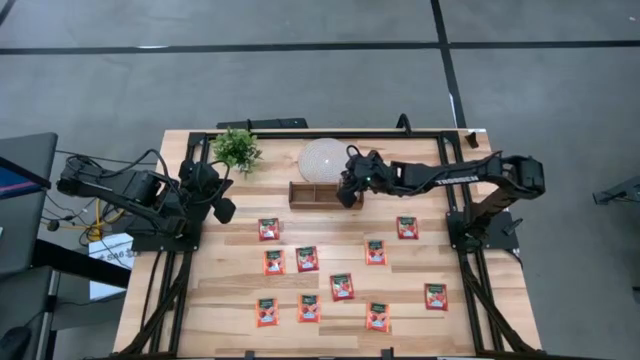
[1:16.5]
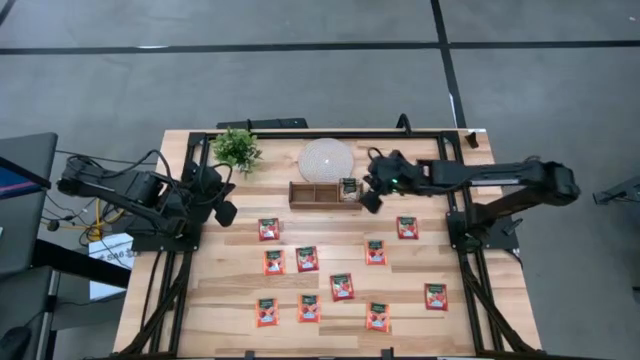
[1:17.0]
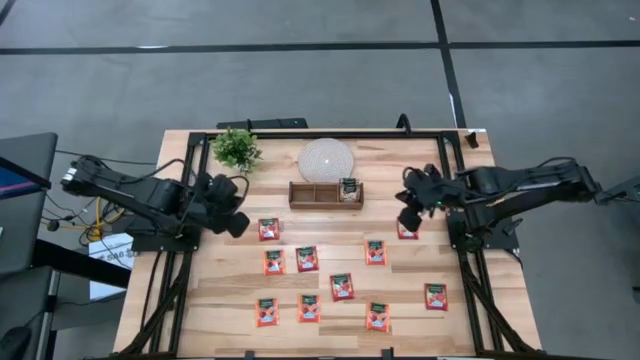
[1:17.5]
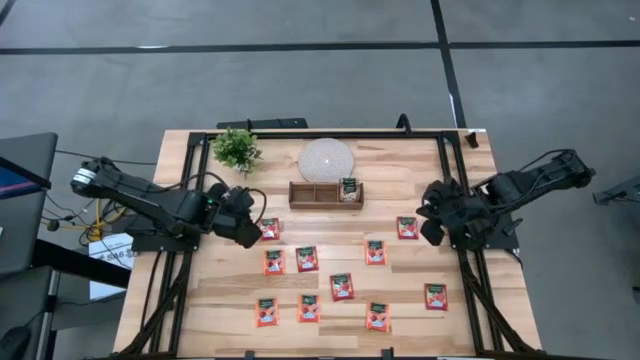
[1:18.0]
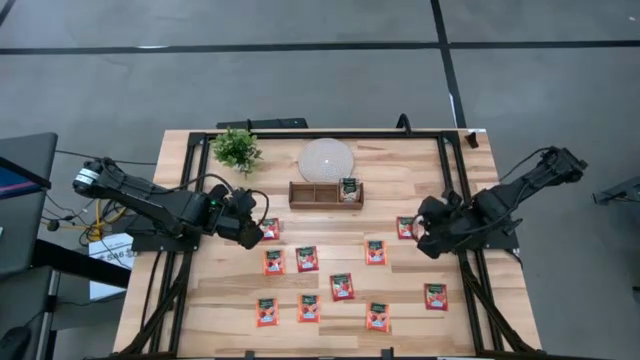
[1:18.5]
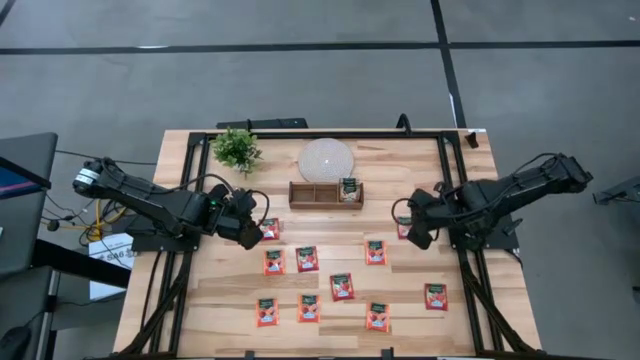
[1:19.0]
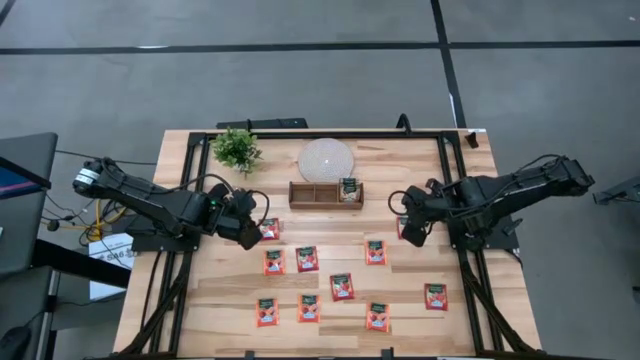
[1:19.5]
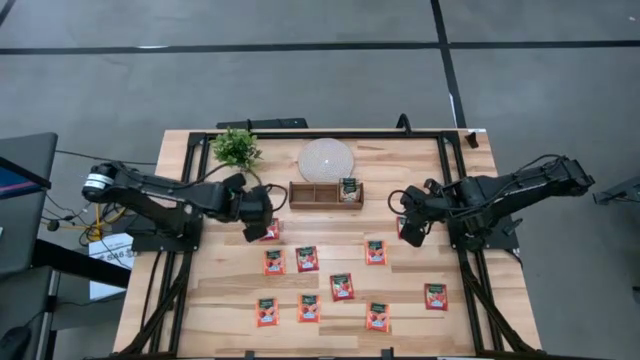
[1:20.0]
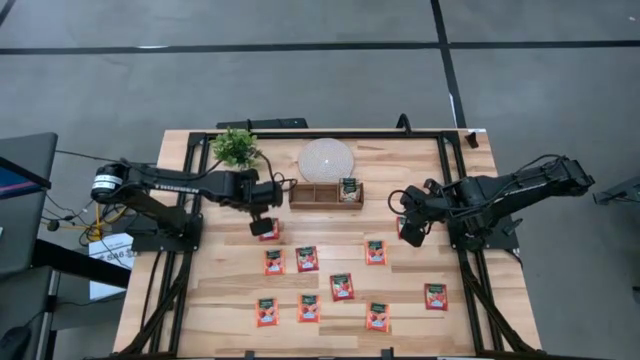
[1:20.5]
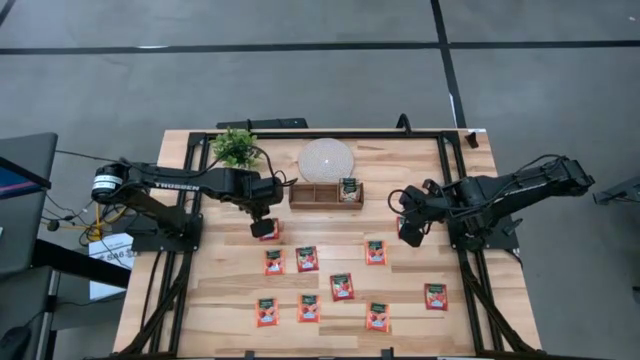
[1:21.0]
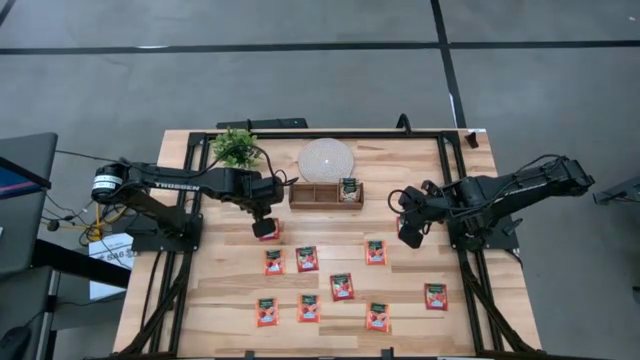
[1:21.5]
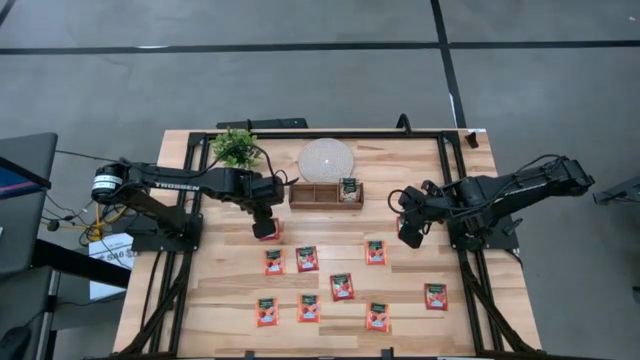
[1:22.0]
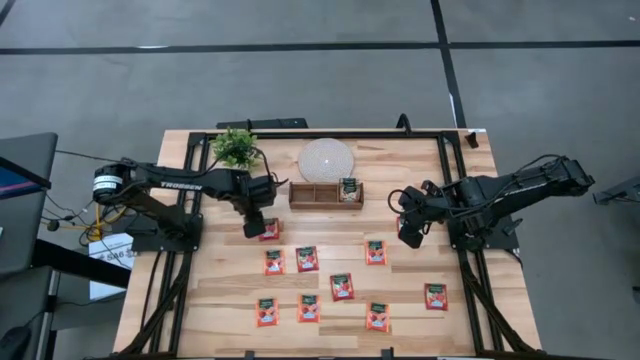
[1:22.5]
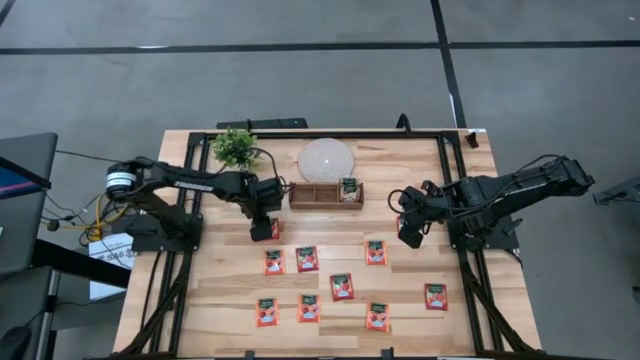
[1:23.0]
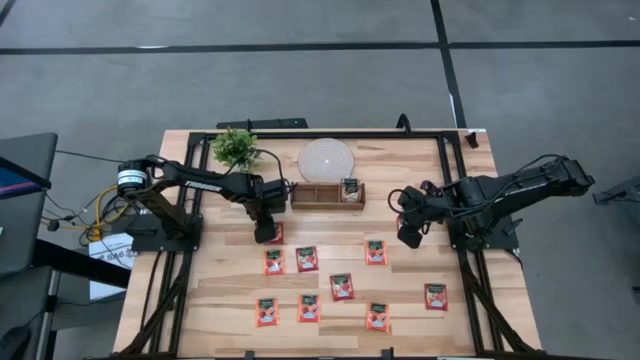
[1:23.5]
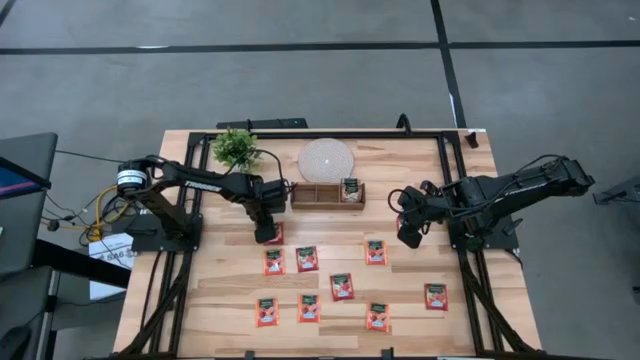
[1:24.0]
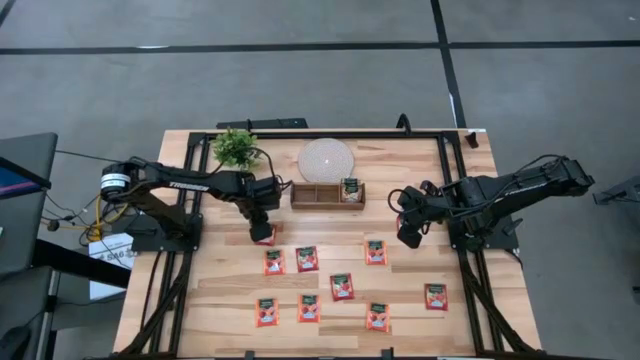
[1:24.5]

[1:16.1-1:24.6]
Task: Pick & Place Tea
Put the red tea bag into the middle section of the wooden organizer

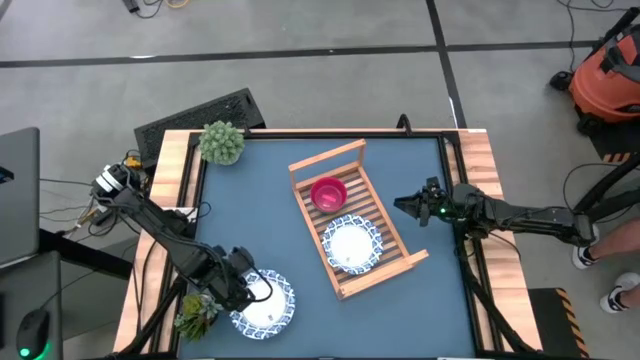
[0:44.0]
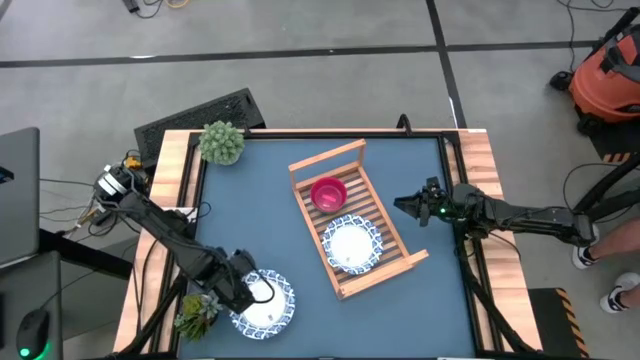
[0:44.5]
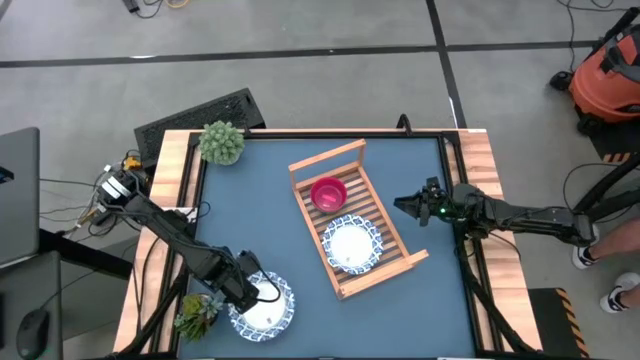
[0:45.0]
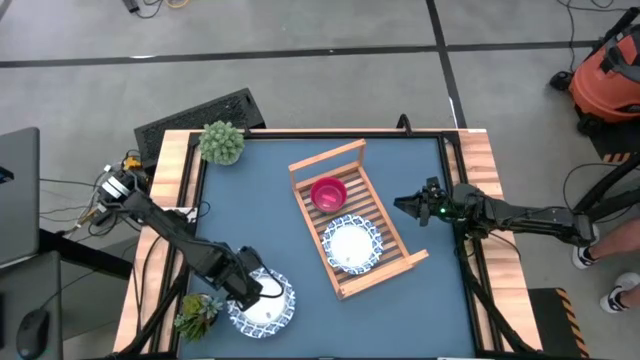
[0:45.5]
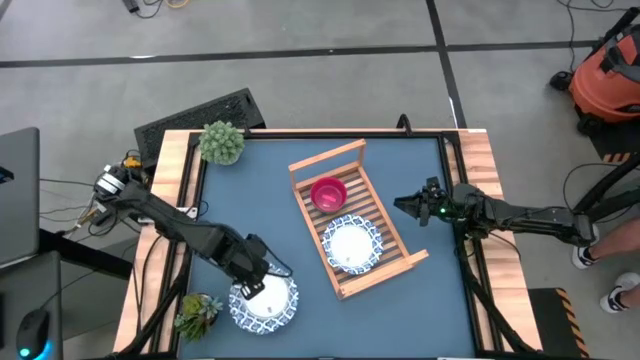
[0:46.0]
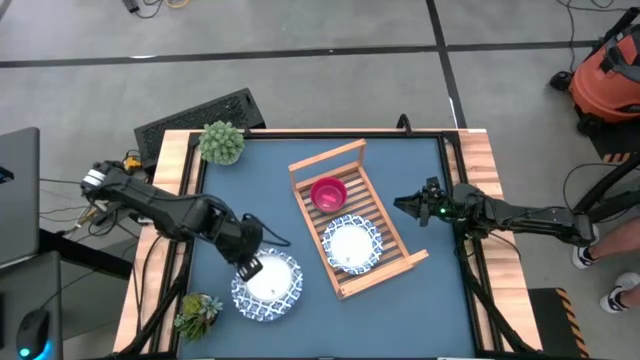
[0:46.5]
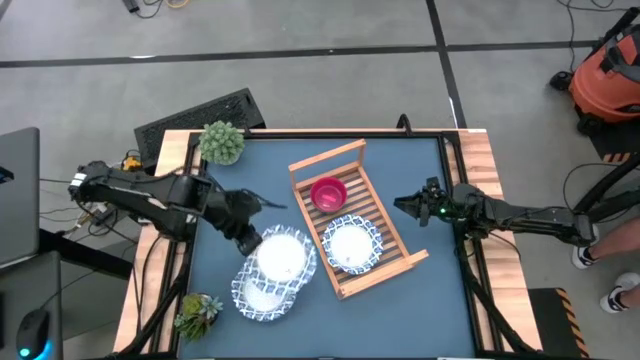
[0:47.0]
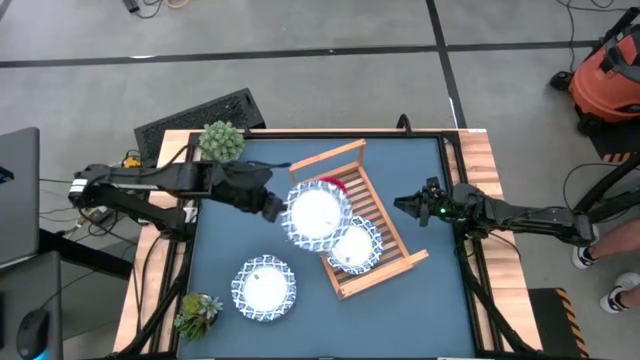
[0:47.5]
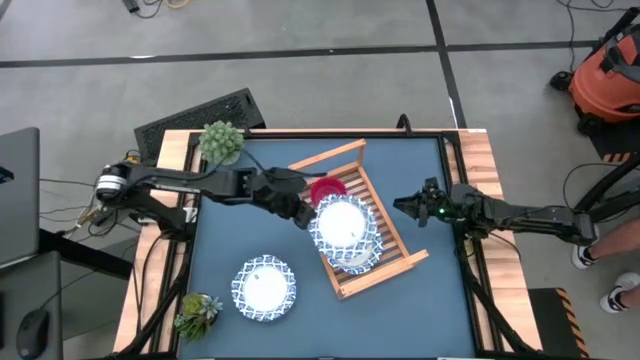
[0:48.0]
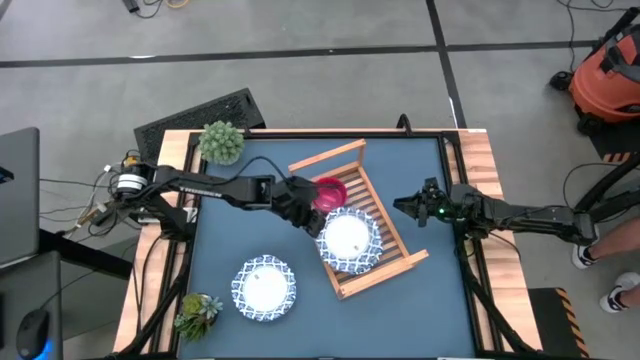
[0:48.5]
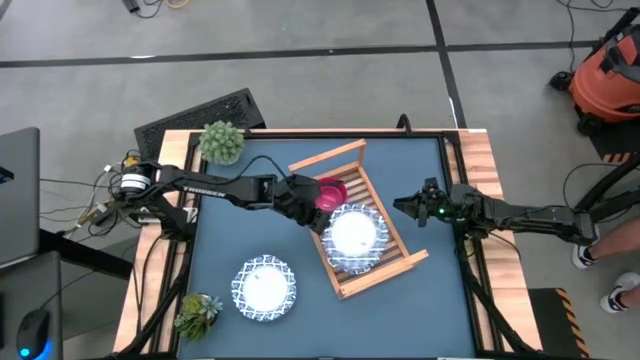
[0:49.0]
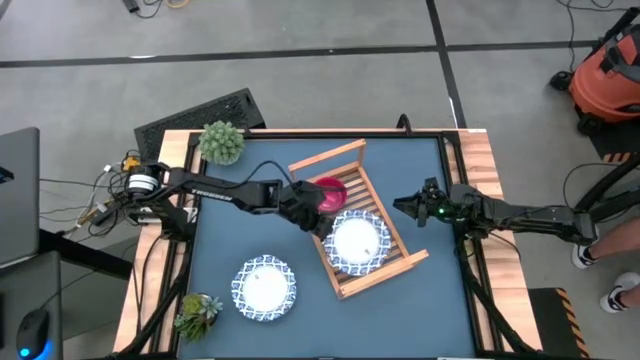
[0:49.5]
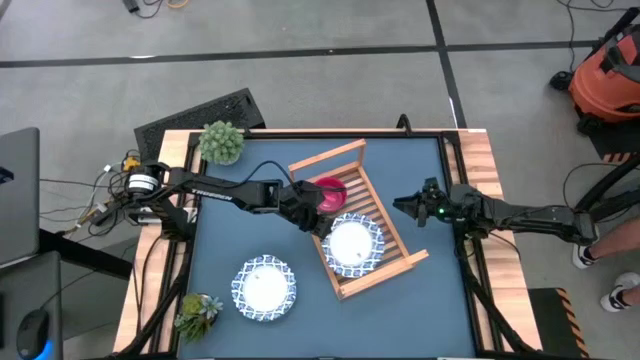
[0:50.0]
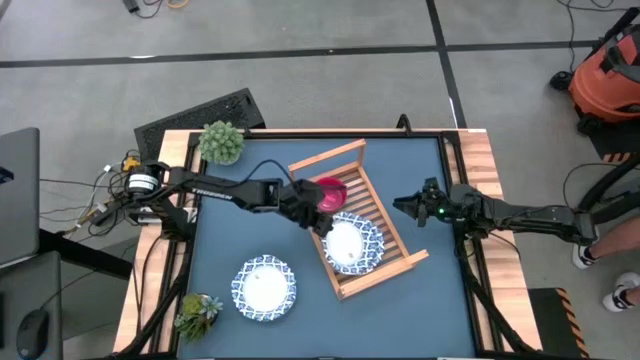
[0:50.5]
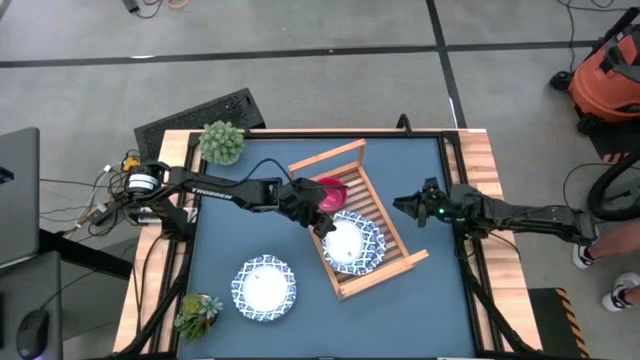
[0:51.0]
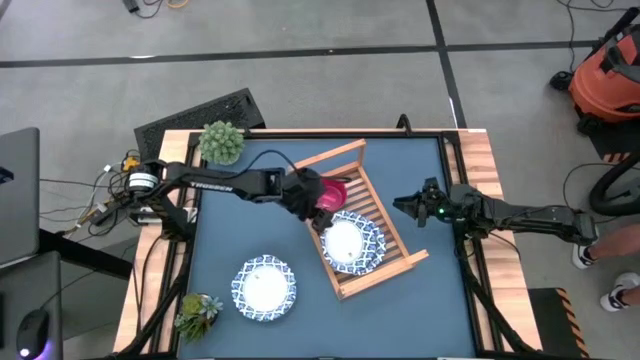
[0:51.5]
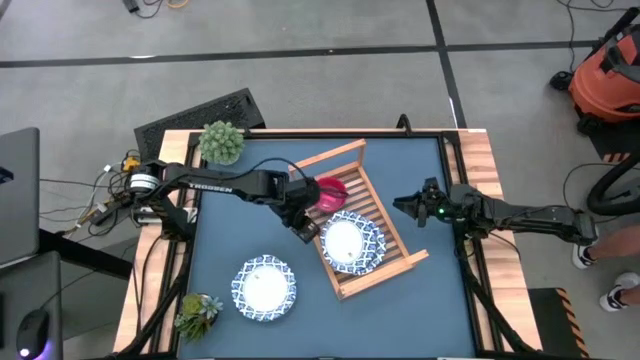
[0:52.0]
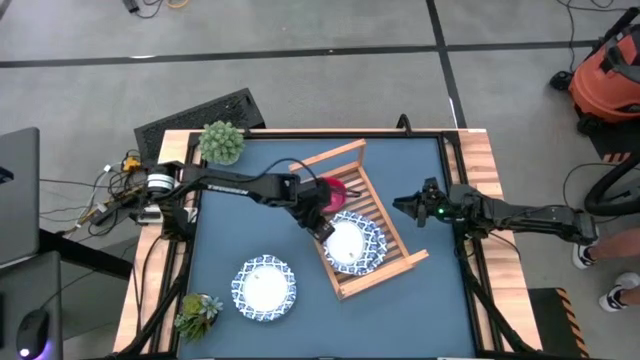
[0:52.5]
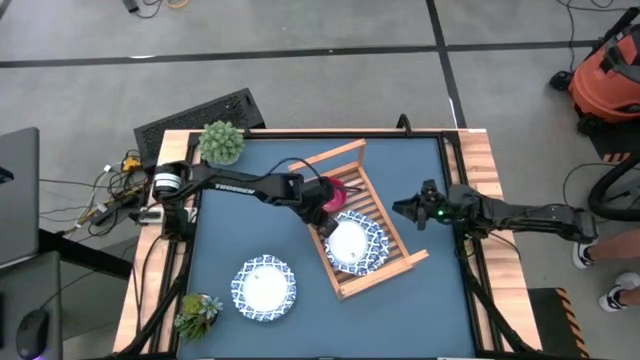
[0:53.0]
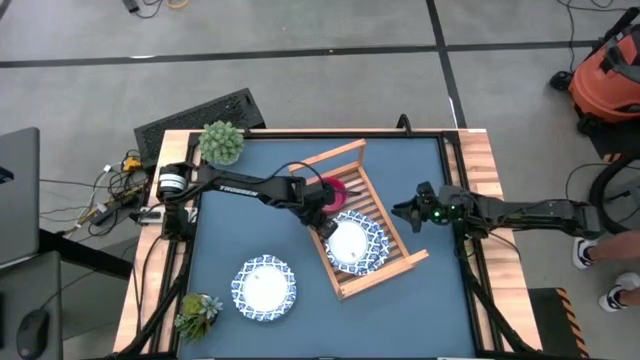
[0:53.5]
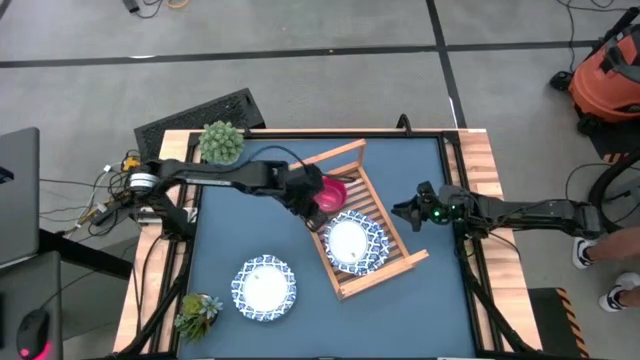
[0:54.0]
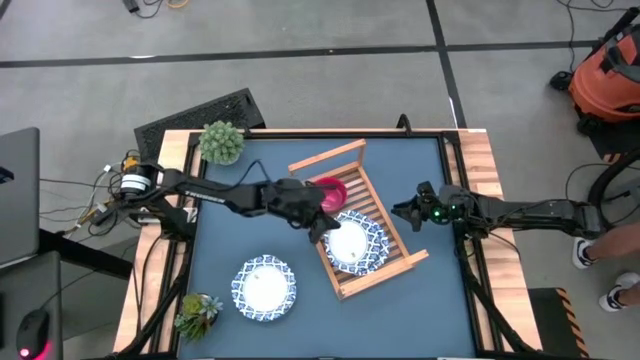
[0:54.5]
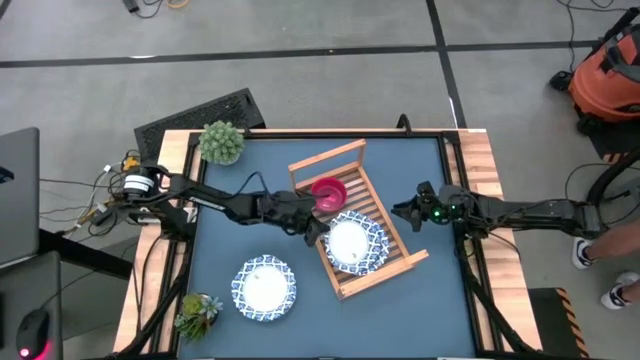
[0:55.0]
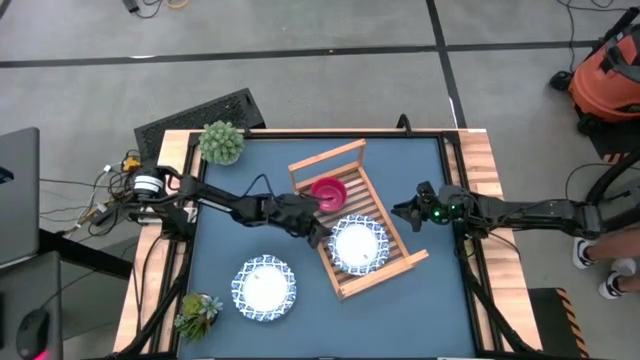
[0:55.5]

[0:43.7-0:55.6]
Task: Place and stack bowls onto a shelf
Stack the white blue bowl on top of the white blue bowl on the shelf

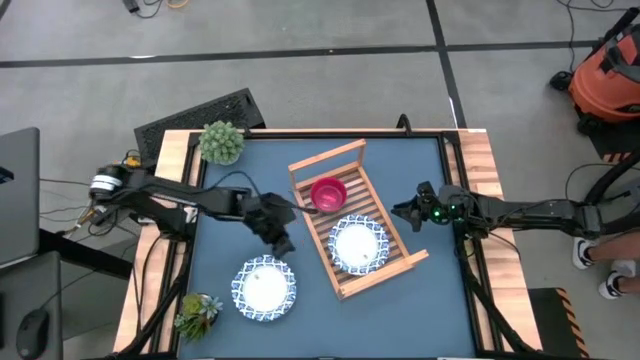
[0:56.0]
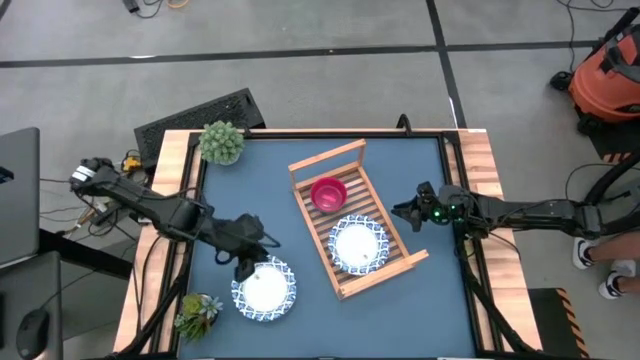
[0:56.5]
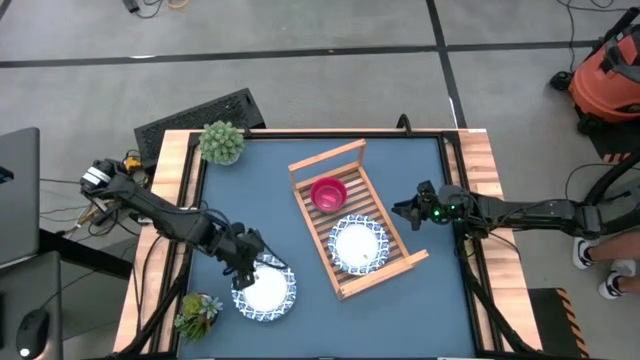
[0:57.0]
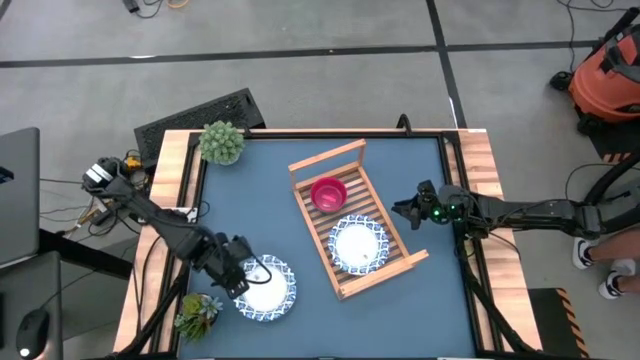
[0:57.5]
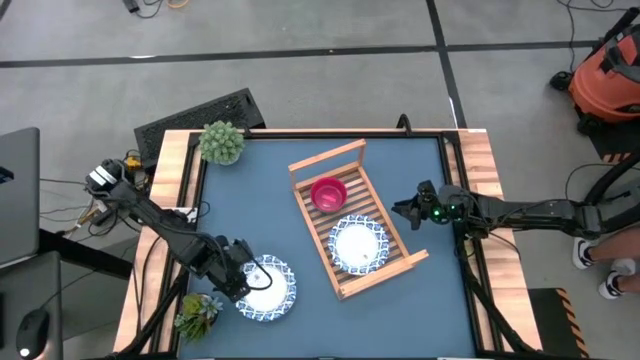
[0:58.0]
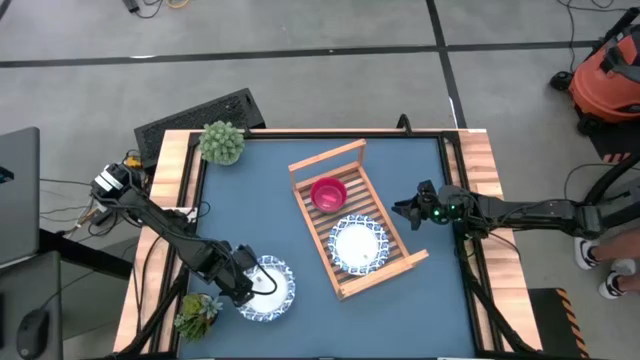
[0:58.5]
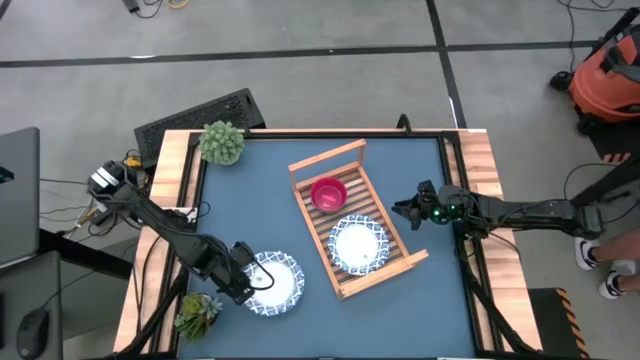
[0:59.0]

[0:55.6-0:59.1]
Stack the white blue bowl on top of the white blue bowl on the shelf
